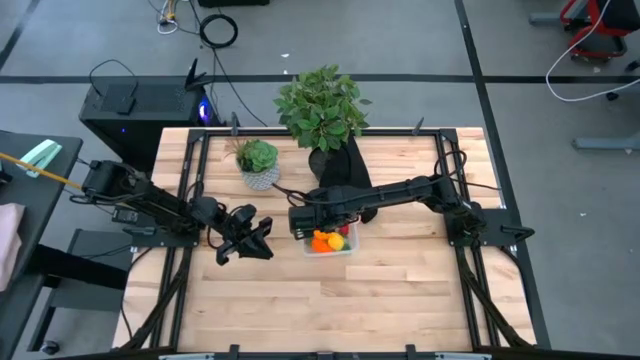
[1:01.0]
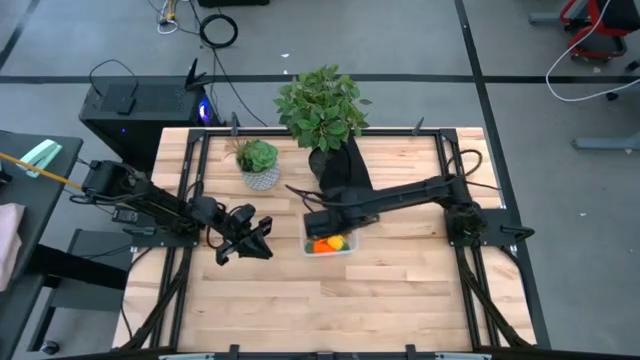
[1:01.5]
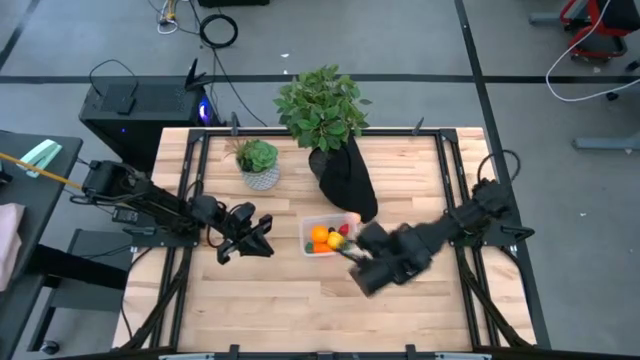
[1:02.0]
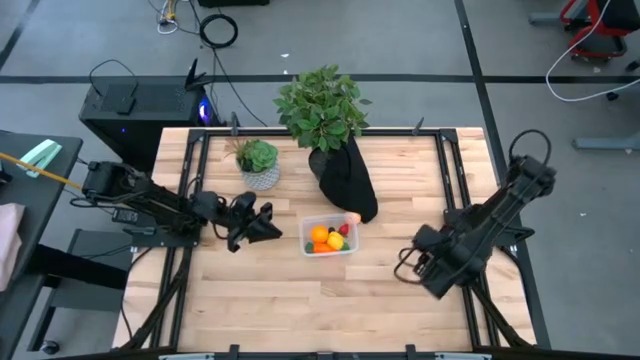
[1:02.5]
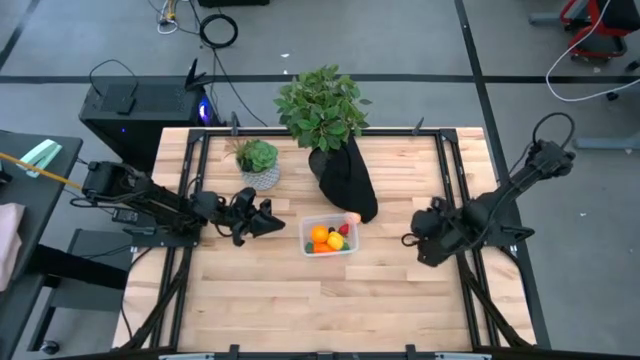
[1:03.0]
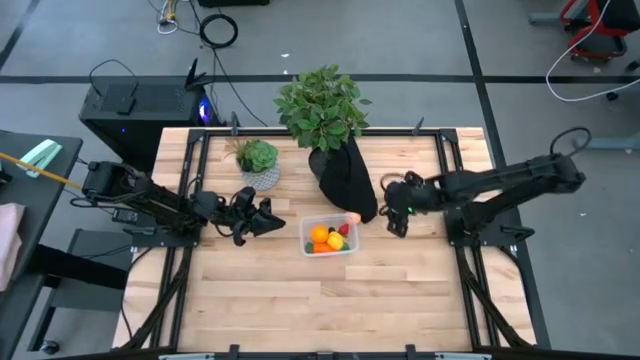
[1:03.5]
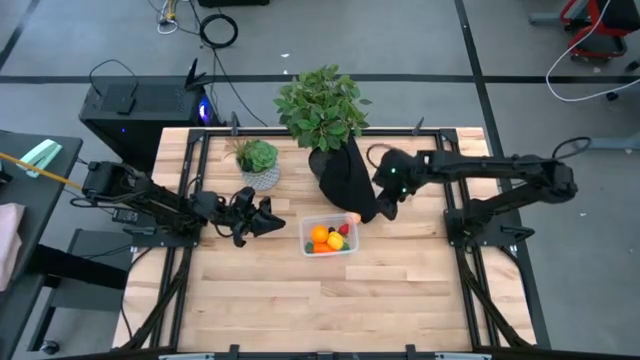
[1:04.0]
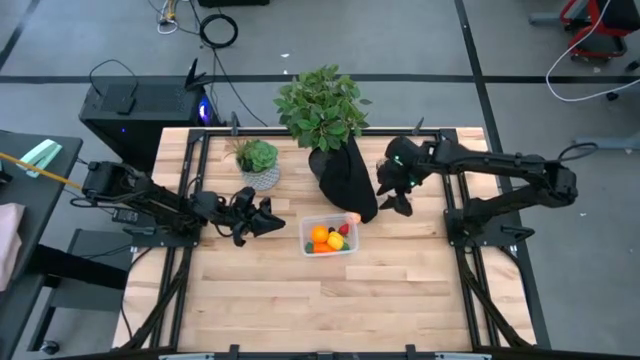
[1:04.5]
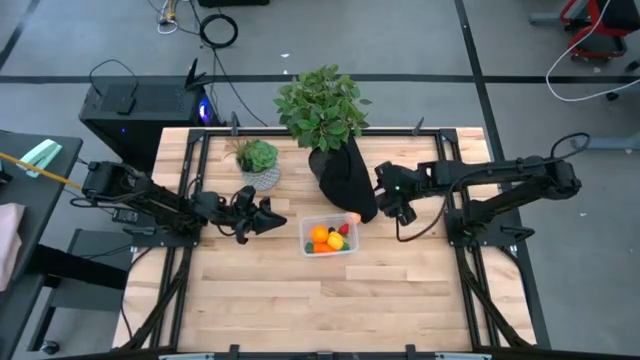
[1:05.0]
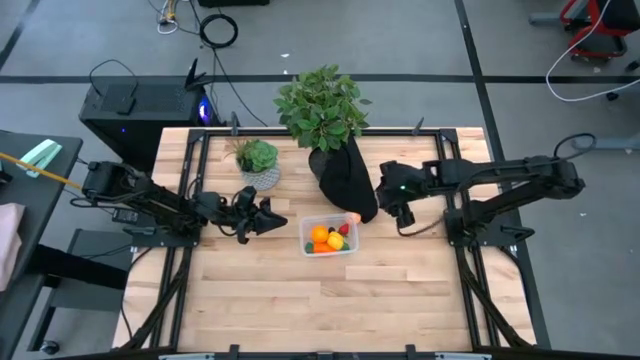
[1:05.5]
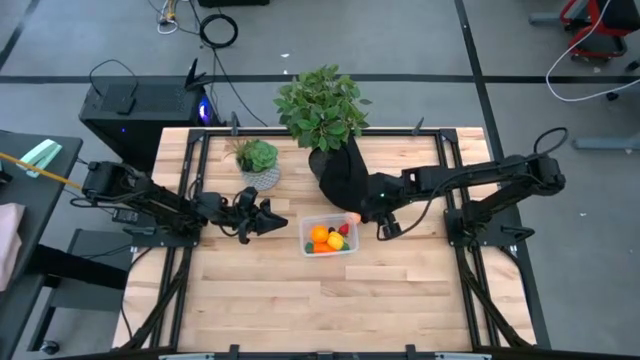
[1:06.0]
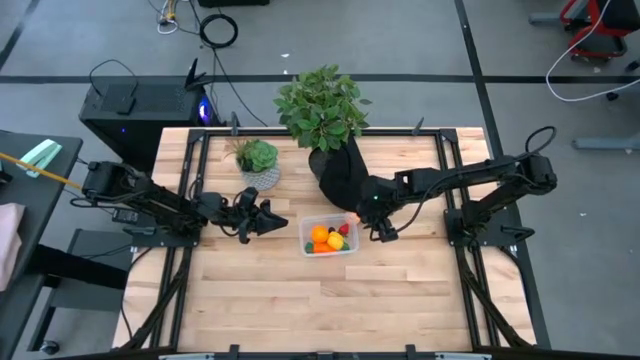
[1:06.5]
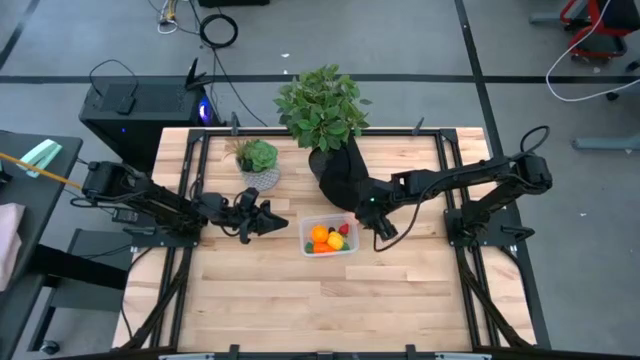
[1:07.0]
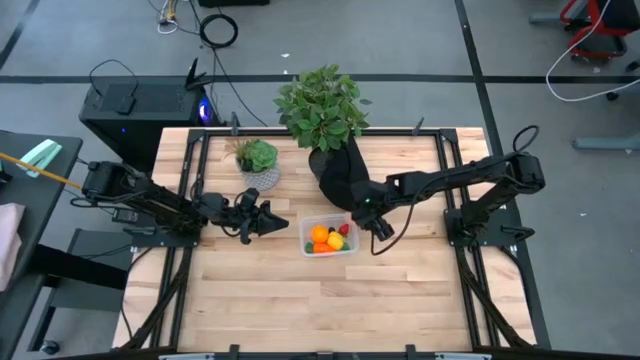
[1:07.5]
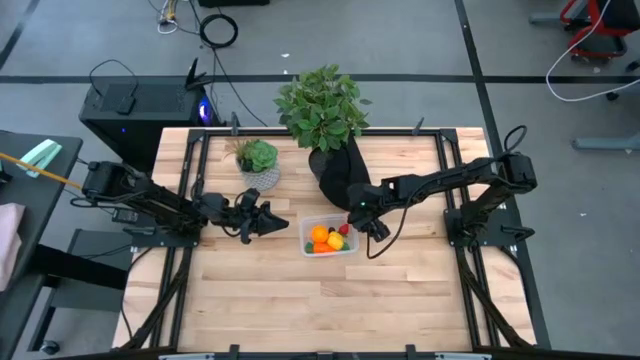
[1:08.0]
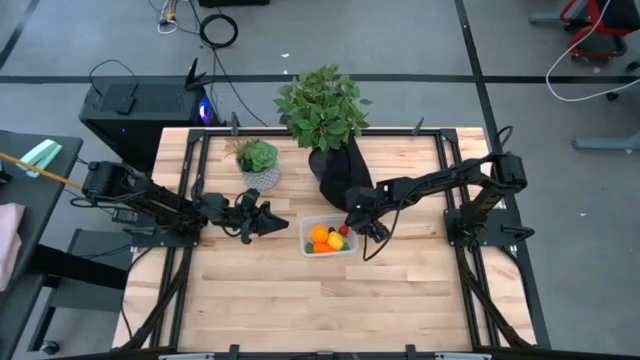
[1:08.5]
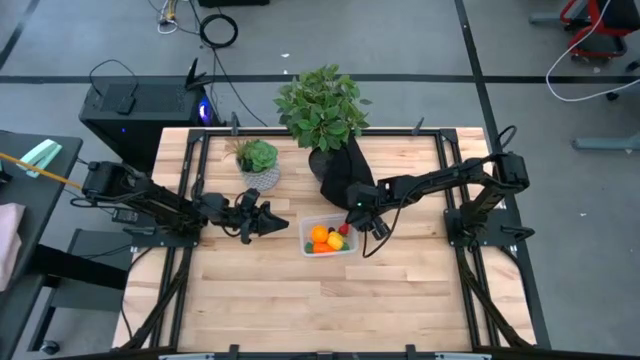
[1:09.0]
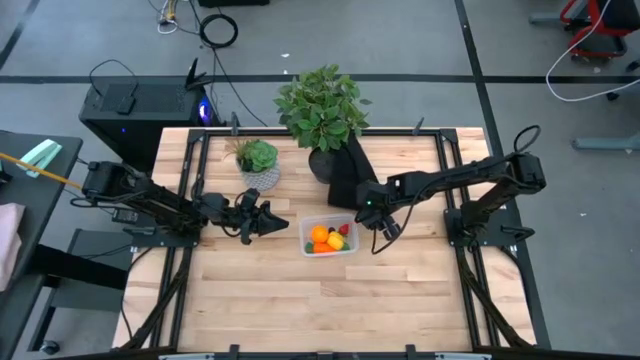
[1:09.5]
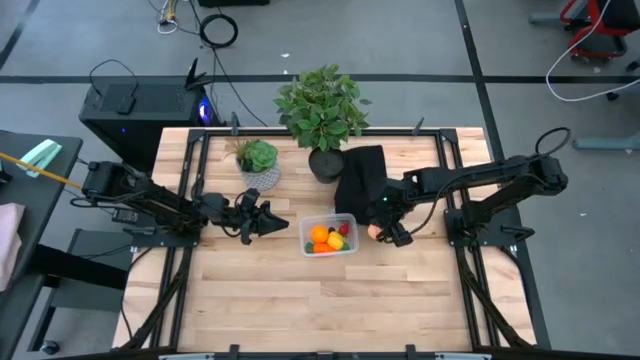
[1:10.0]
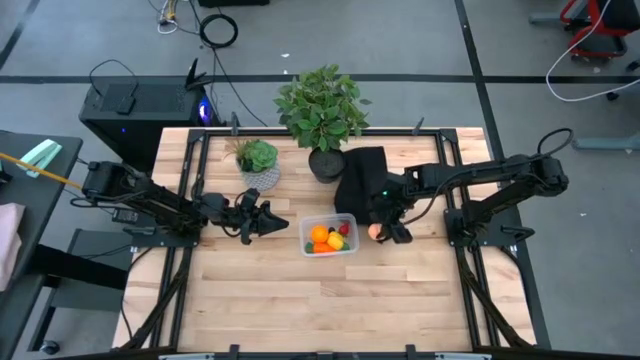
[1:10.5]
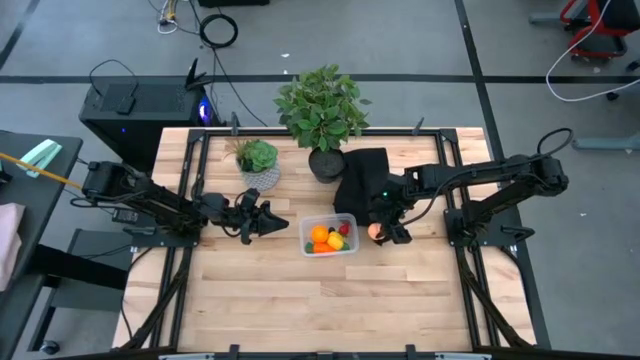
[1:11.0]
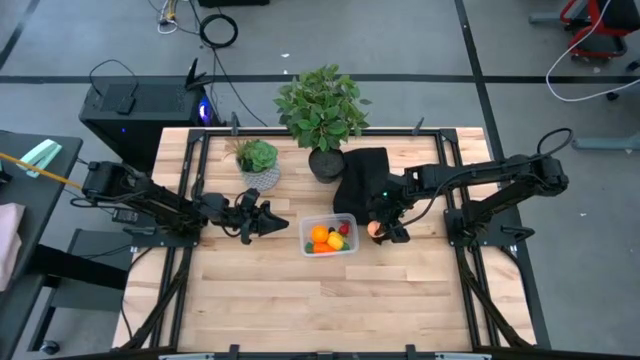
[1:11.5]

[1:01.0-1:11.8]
Task: Pick and placing Produce into tupperware
Put the light orange peach into the transparent bin

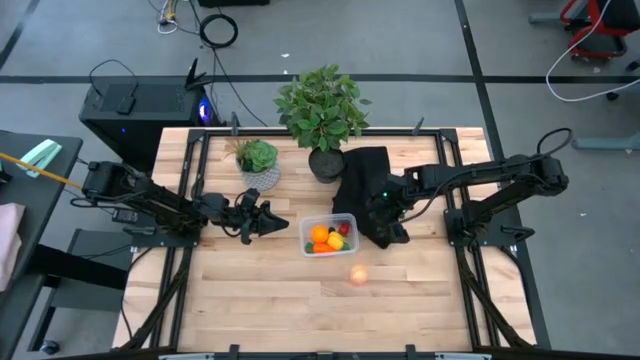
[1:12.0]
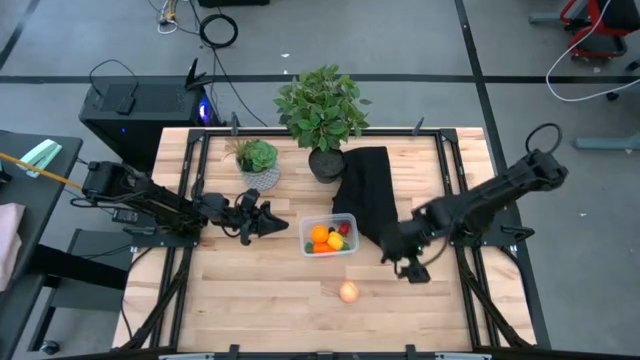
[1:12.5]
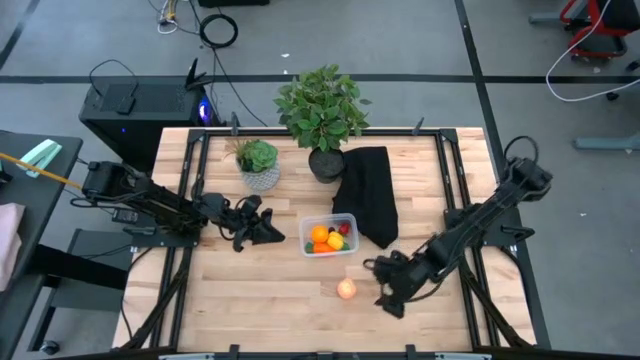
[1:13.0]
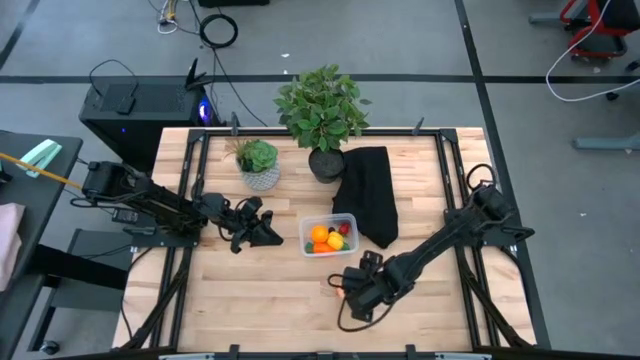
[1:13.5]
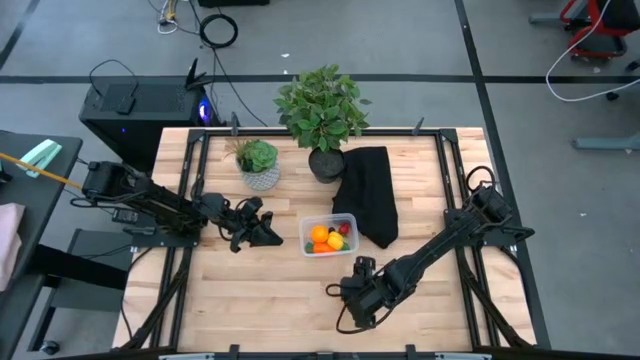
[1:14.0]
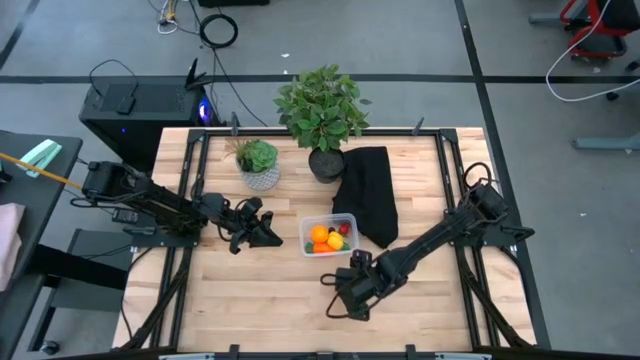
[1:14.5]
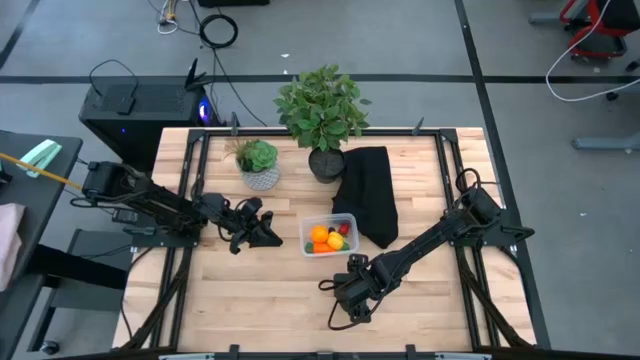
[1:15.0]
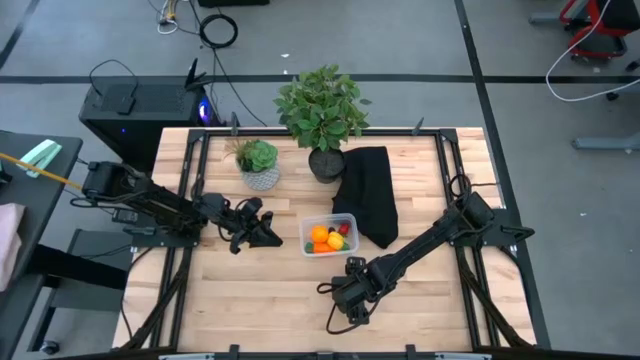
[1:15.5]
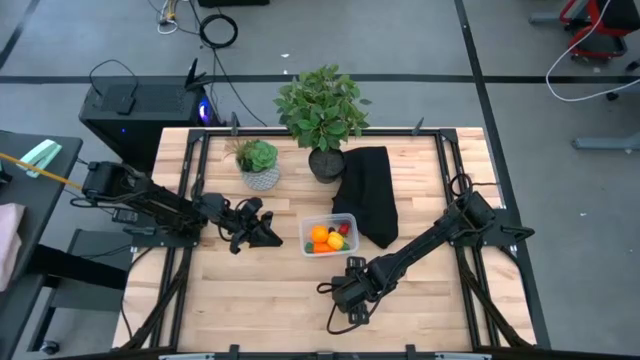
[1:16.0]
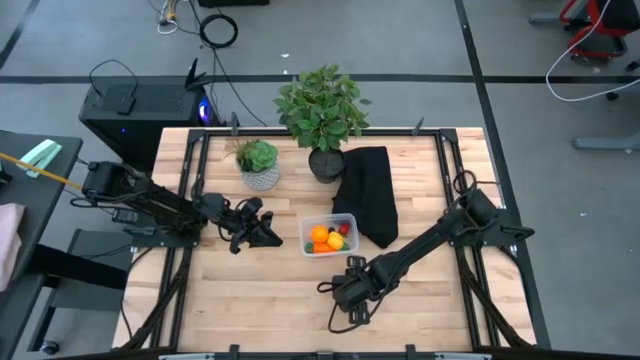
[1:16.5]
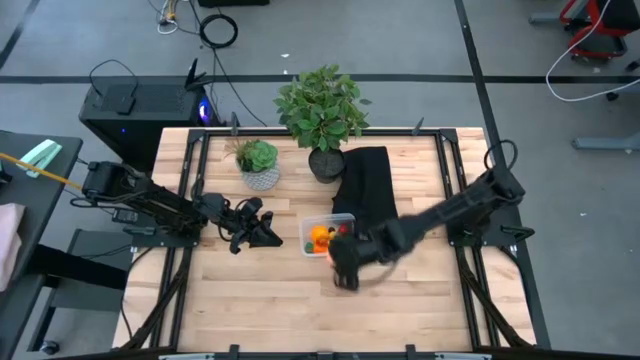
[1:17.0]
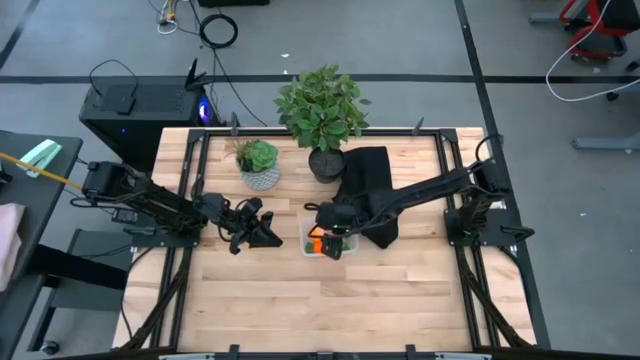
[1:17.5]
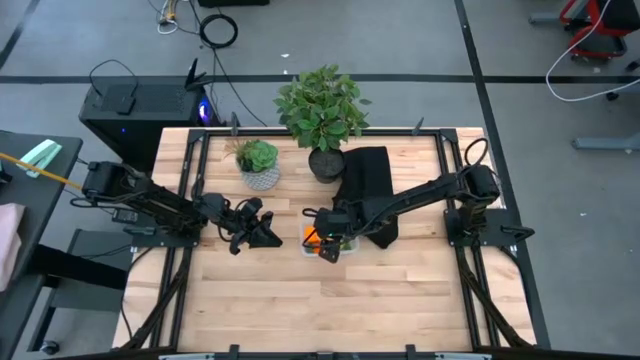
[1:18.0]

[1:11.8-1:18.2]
Put the light orange peach into the transparent bin

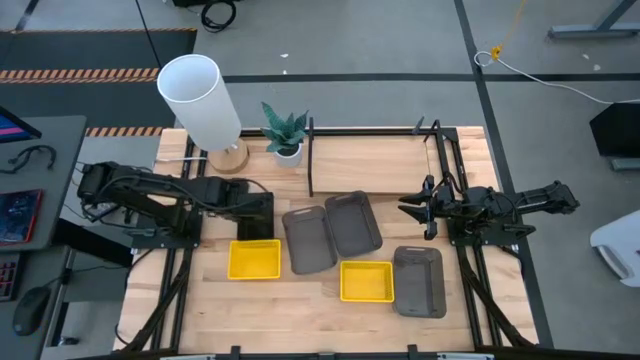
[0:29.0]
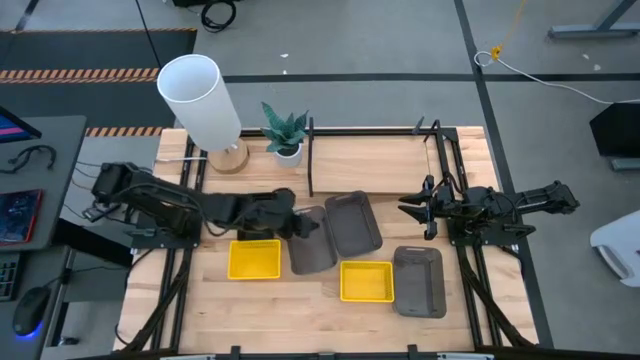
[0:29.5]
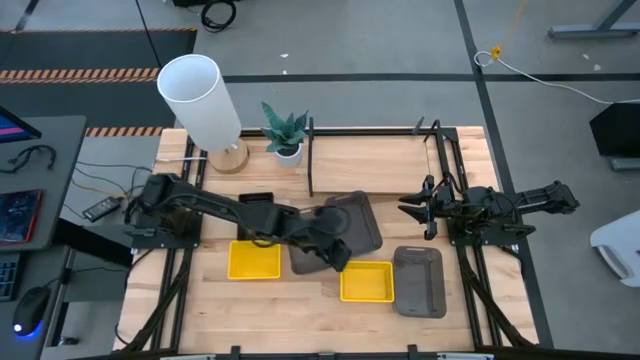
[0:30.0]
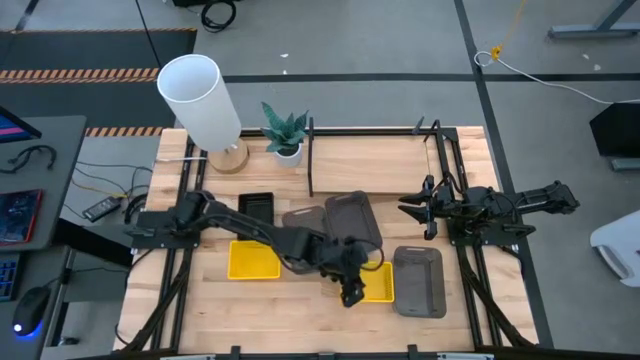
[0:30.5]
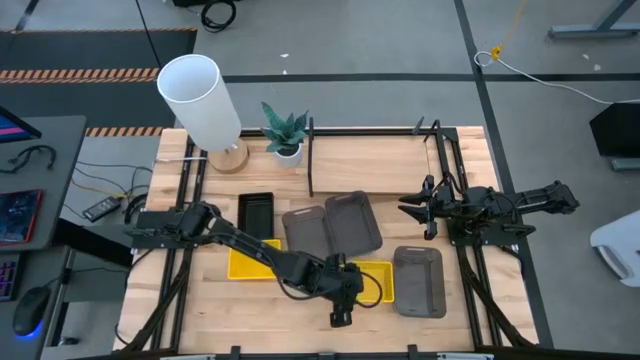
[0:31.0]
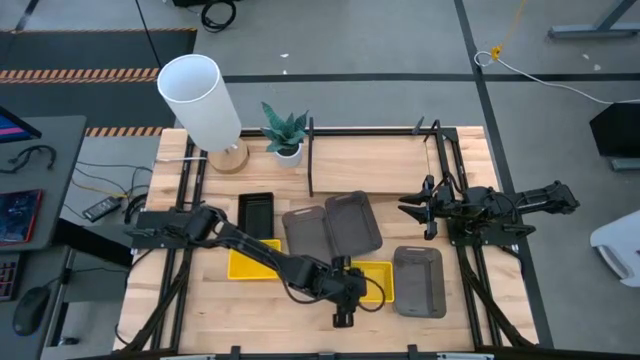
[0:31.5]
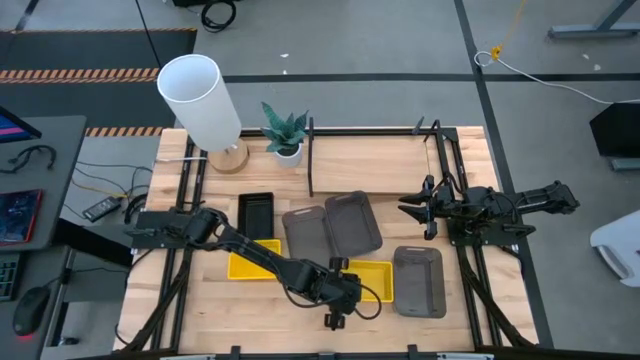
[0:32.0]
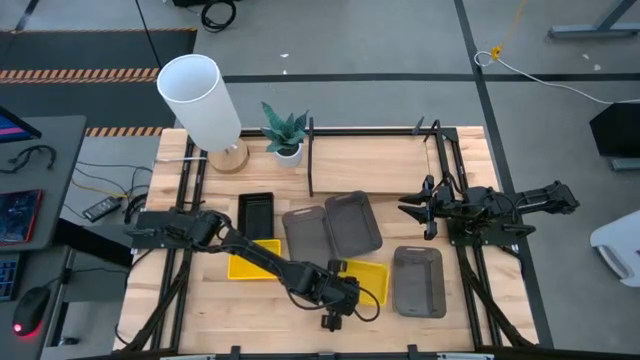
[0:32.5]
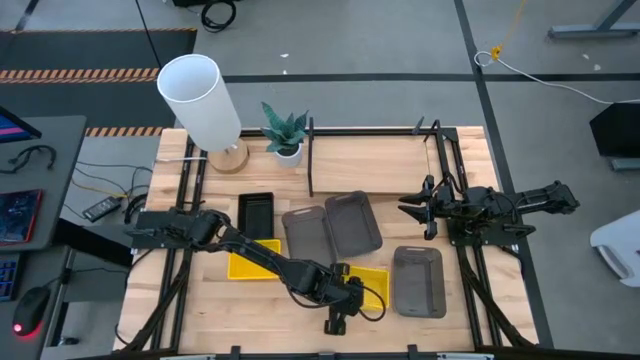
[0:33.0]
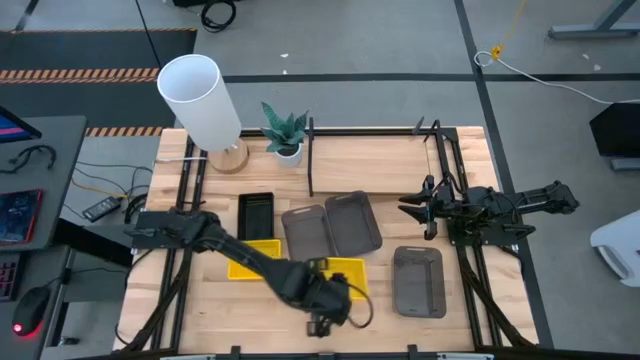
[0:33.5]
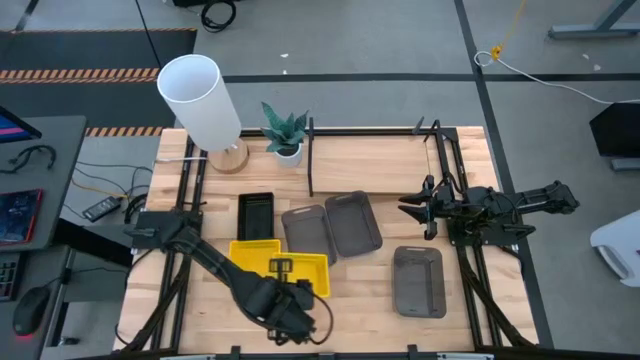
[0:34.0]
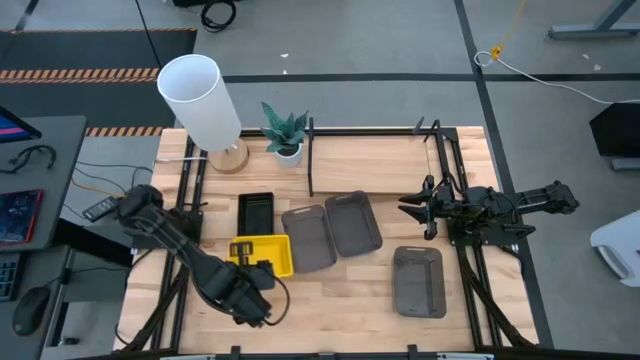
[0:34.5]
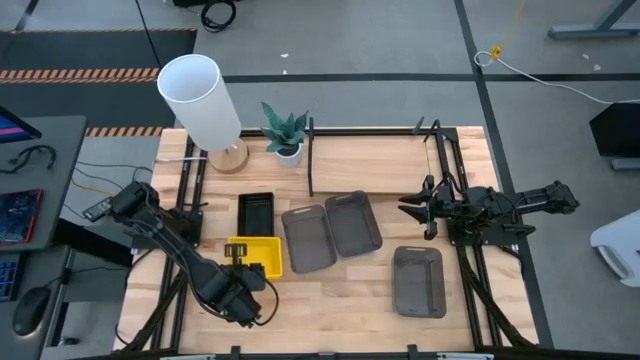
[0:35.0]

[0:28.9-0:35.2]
Task: Stack baskets on shelf by color
Stack the right yellow bin on the stacked yellow bins
